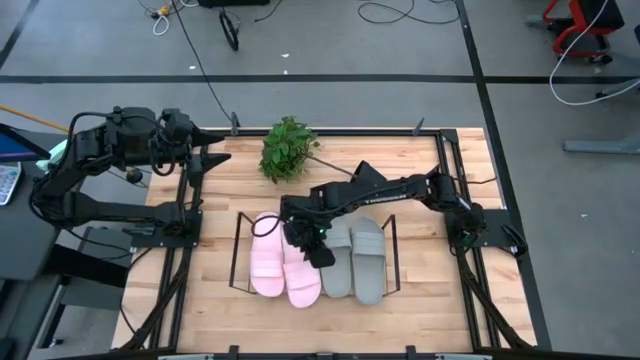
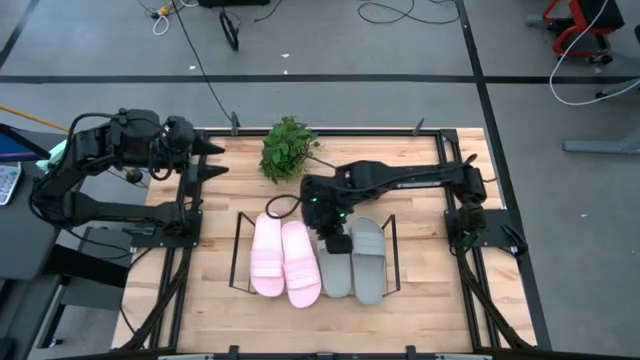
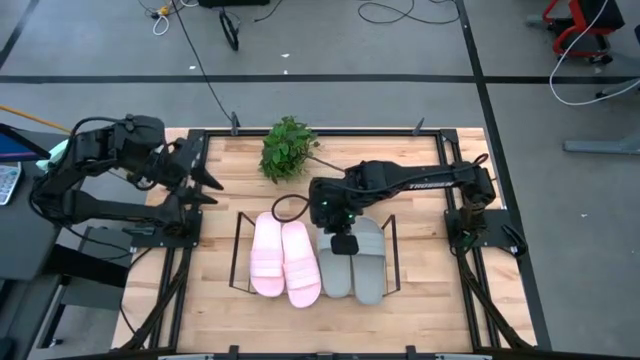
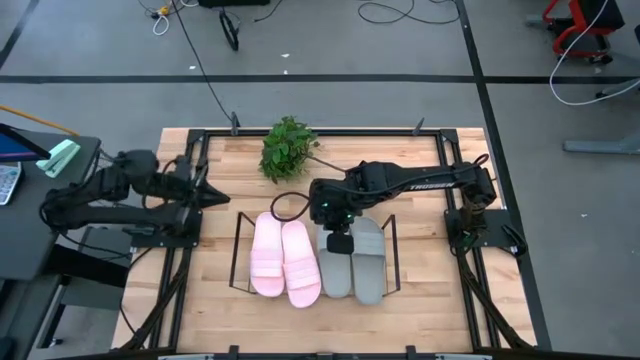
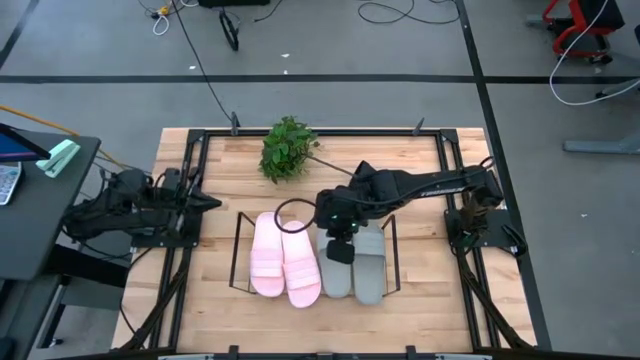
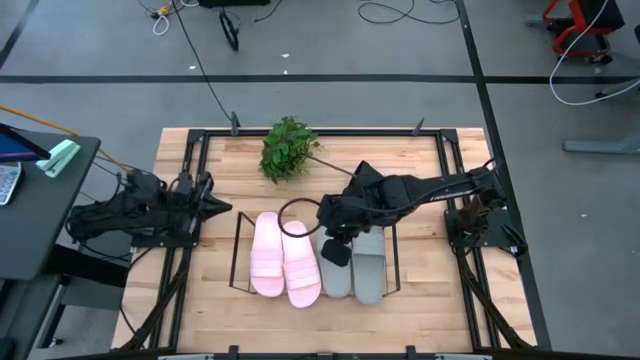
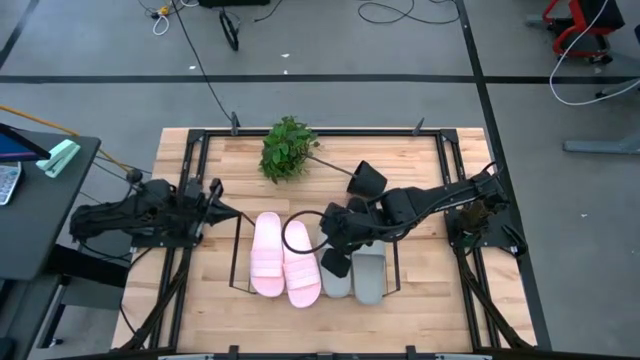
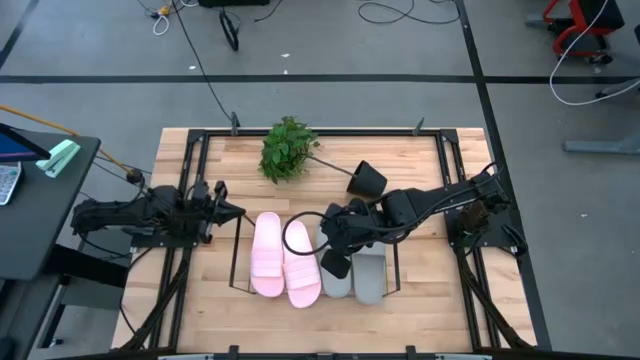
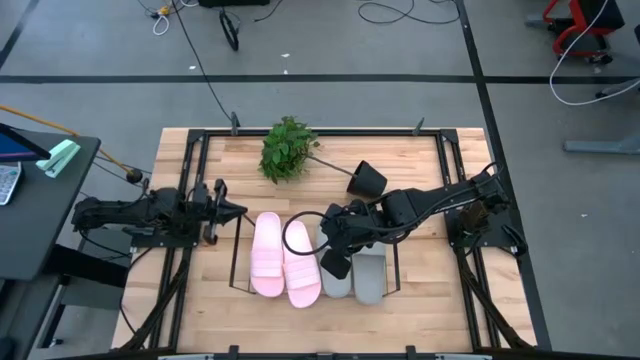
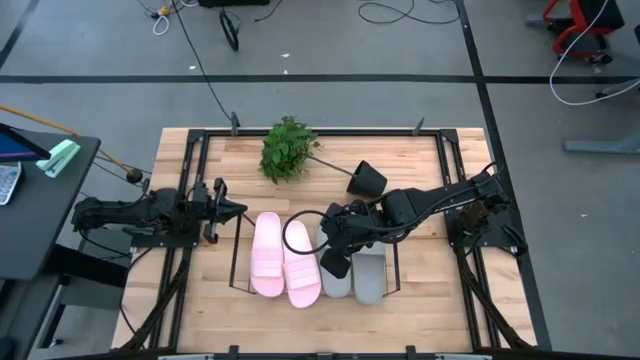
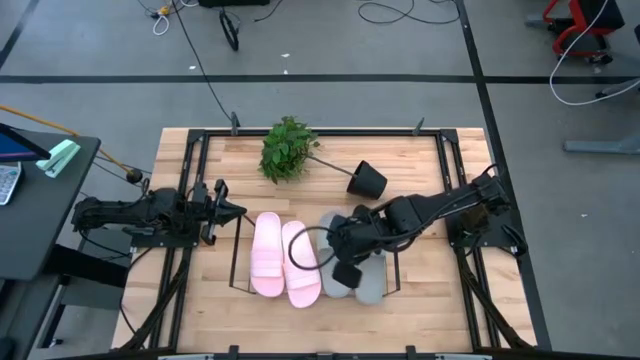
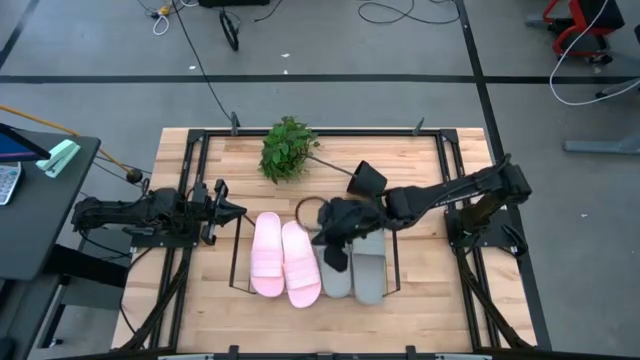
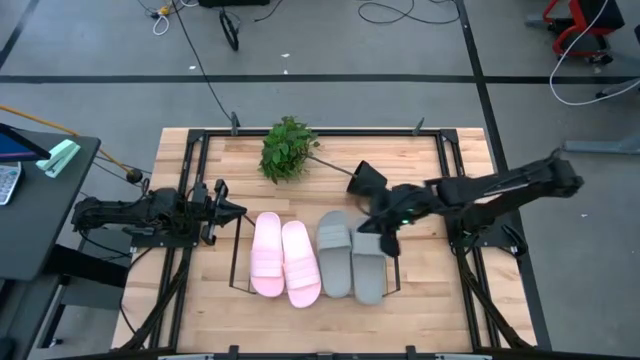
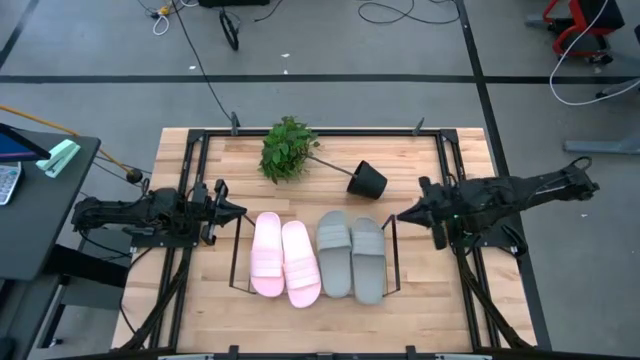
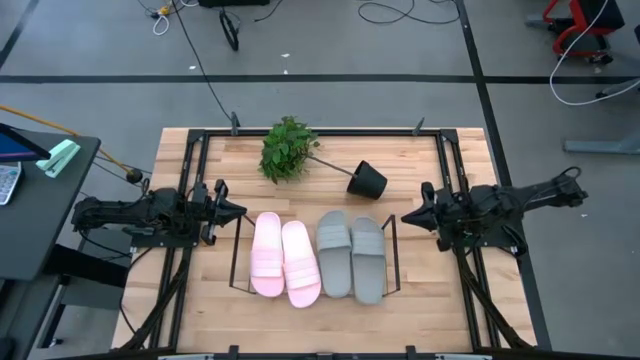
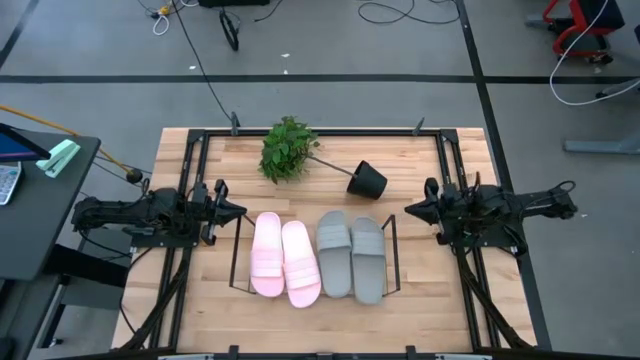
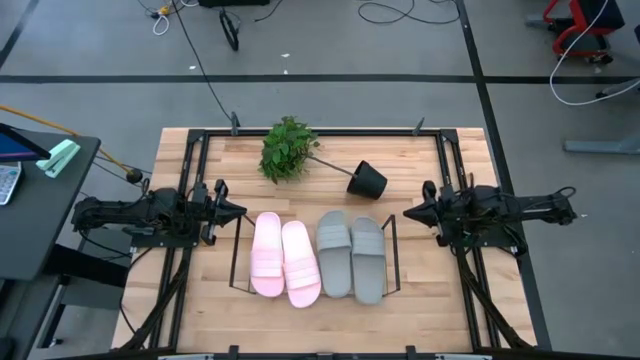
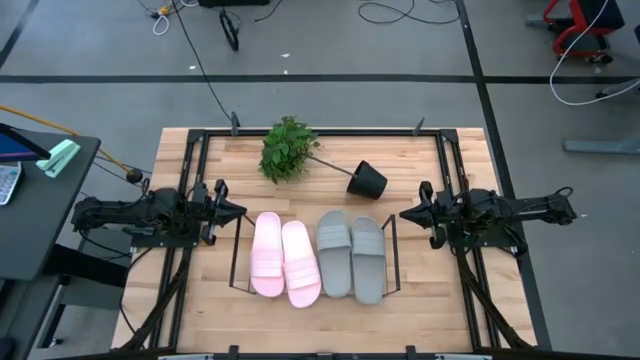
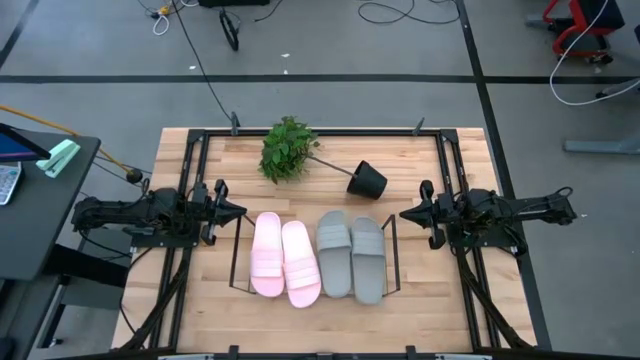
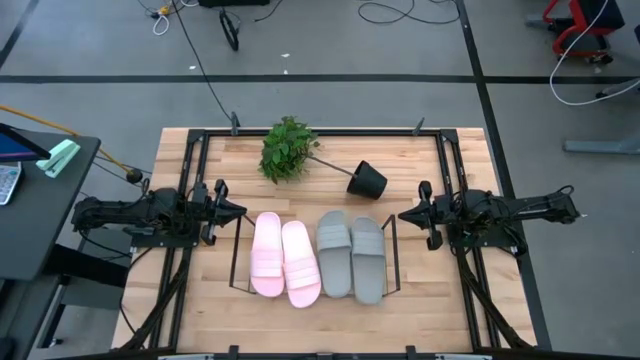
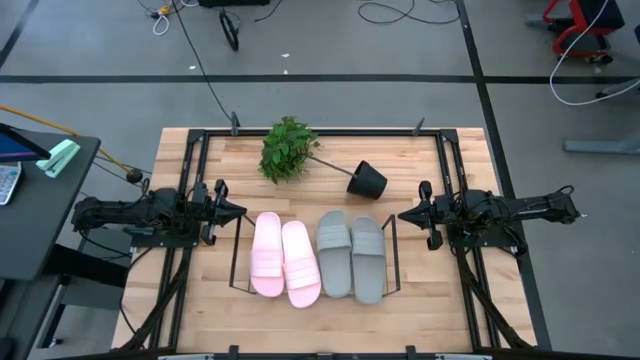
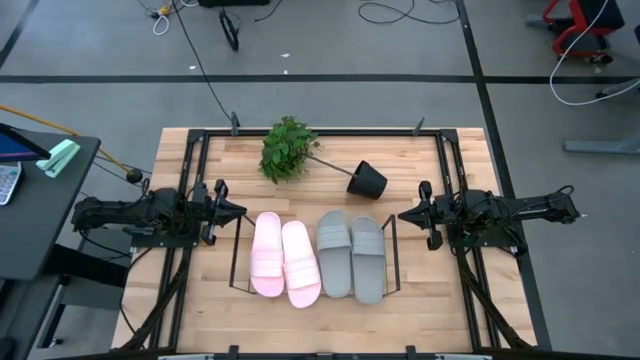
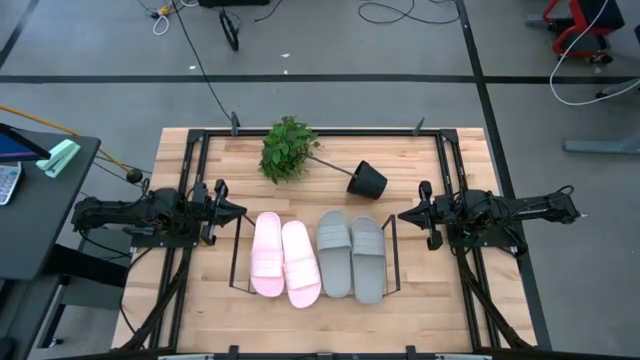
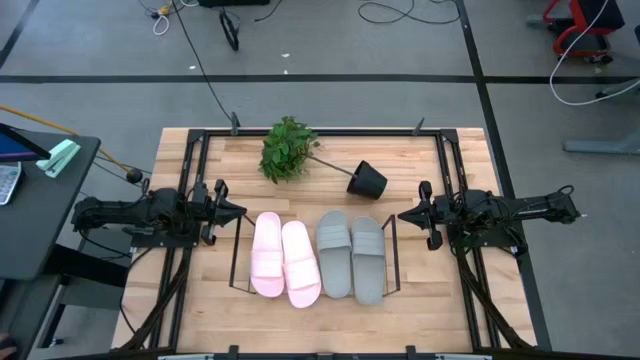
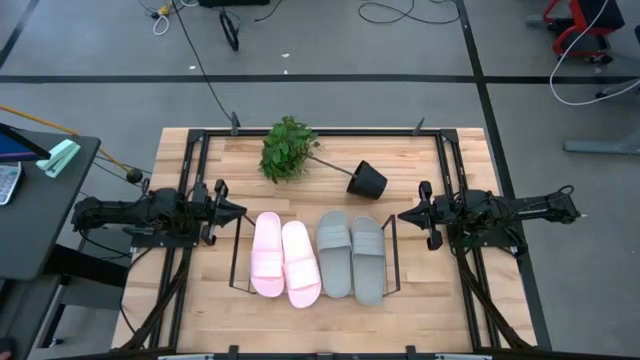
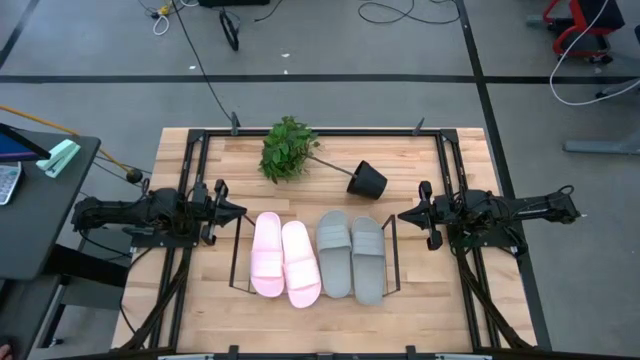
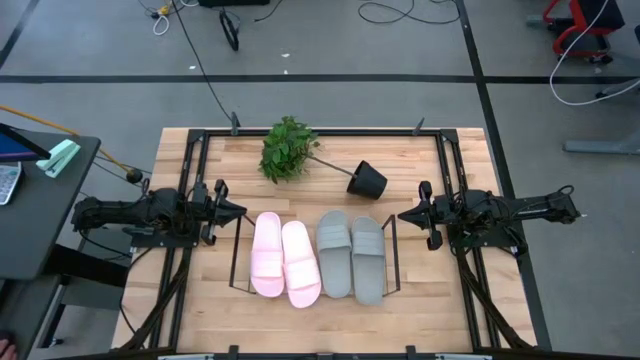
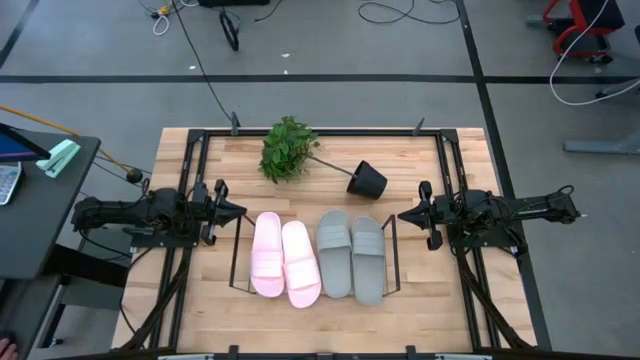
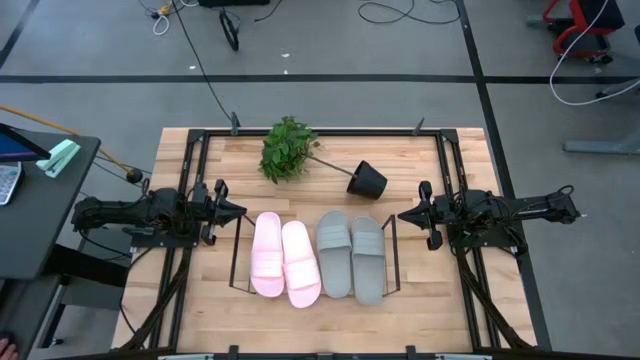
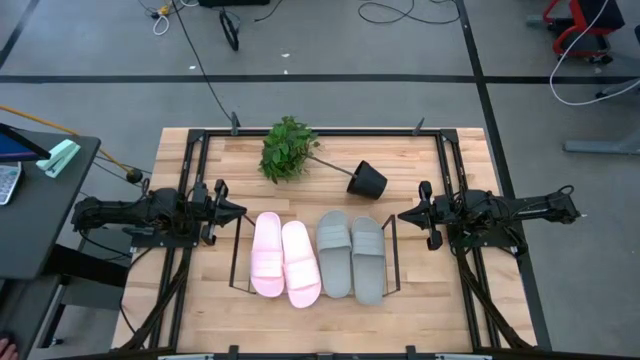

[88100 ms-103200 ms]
Task: Pick and place slides into the shelf
Return to Home Position

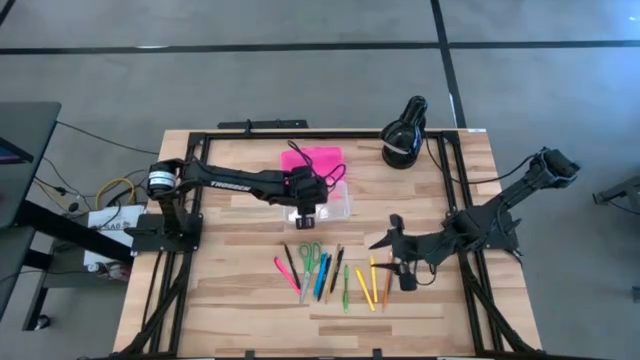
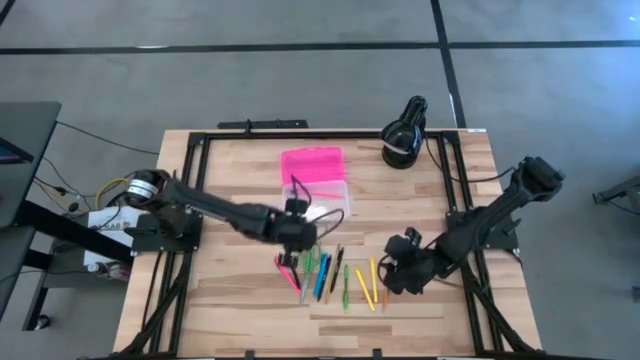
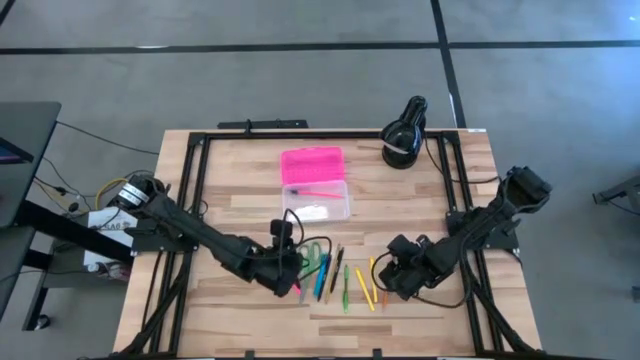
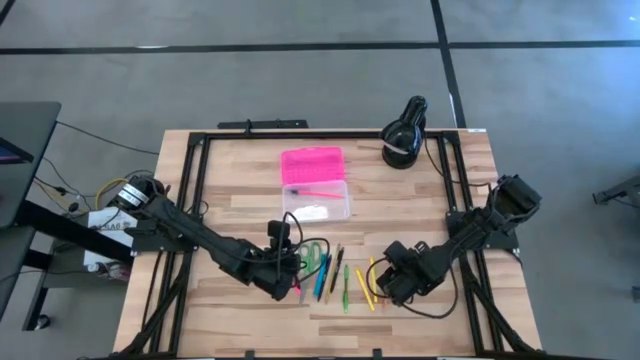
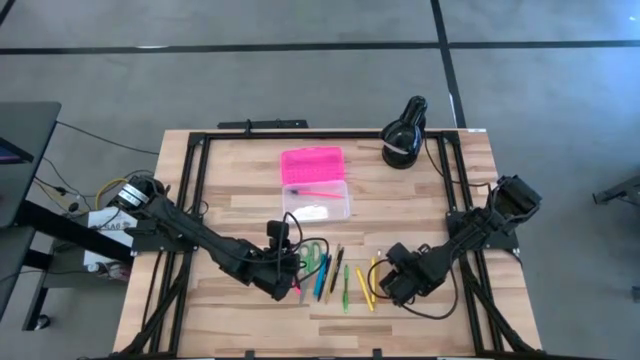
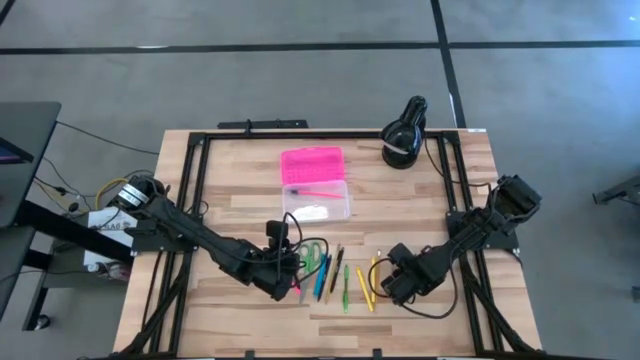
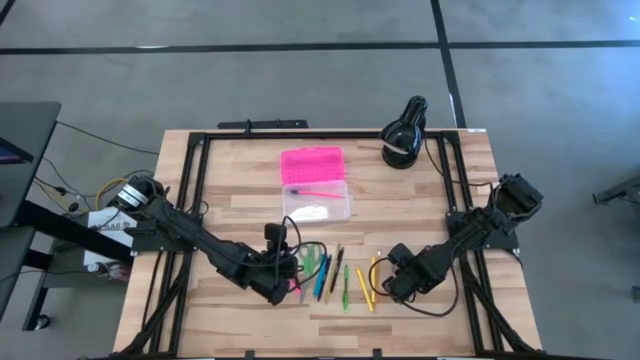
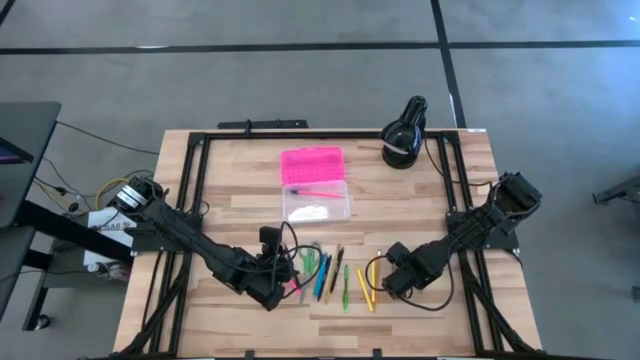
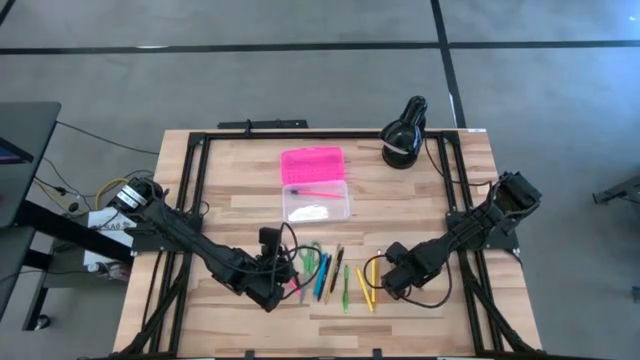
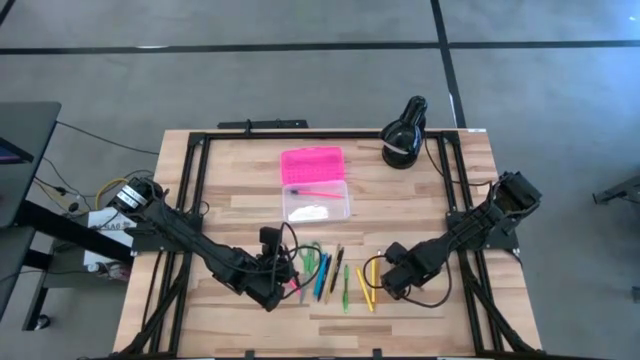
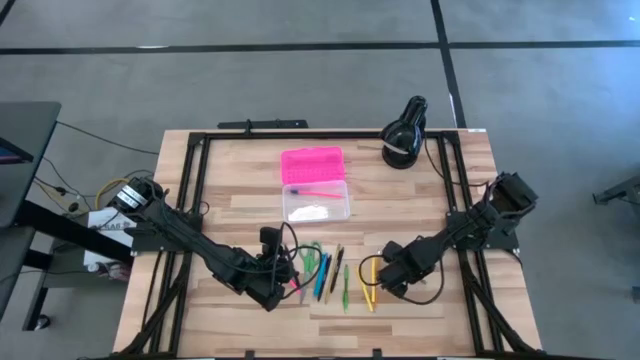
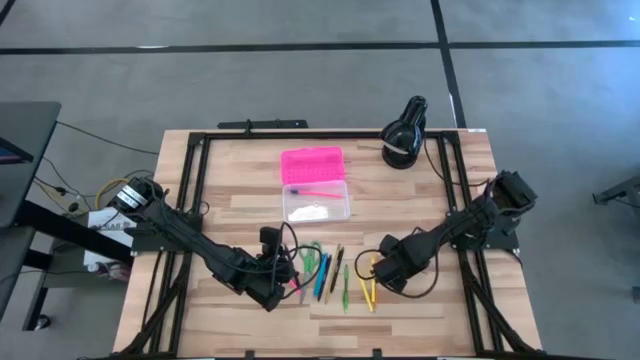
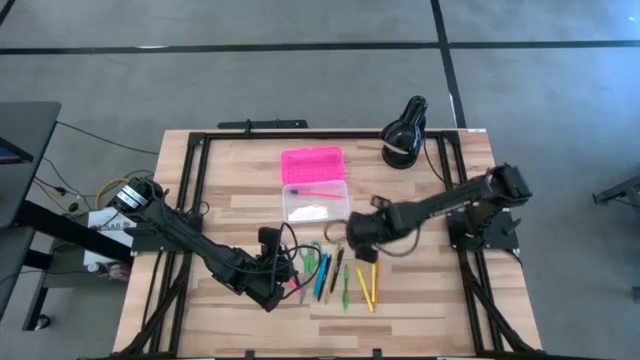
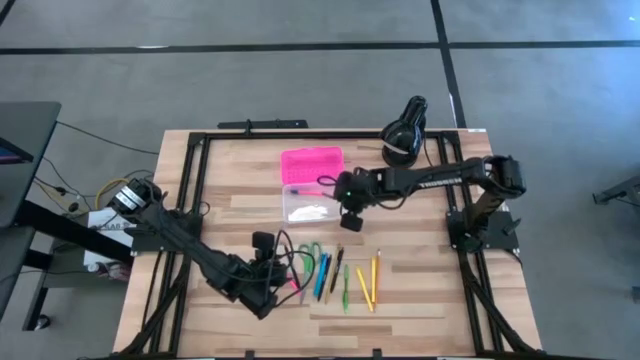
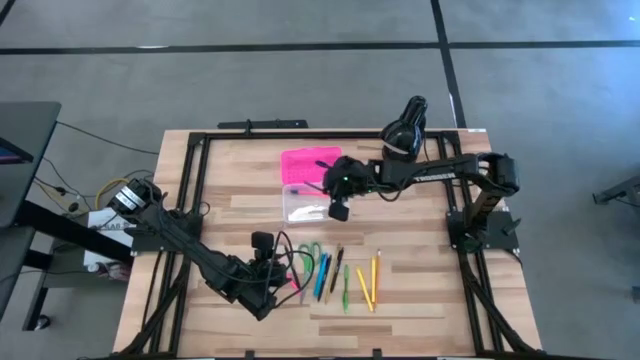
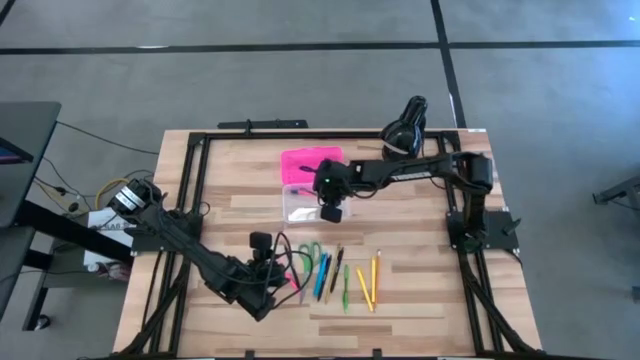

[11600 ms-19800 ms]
Task: Pick & place school supplies into a supply box
Put the gray pen into the supply box
